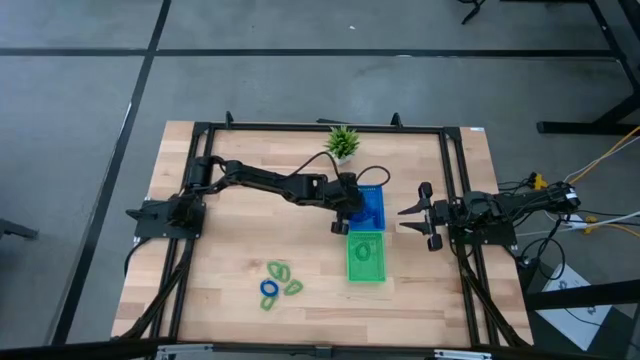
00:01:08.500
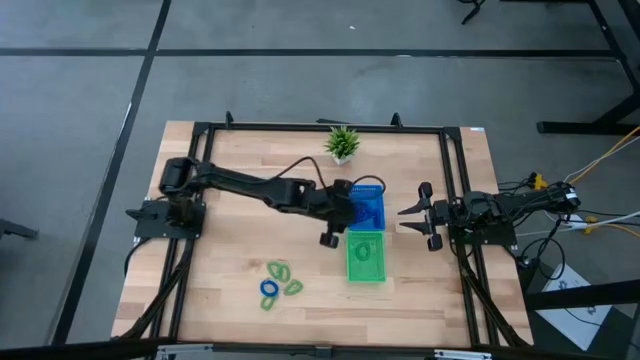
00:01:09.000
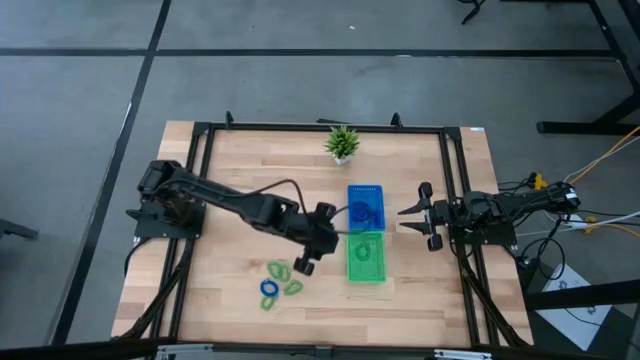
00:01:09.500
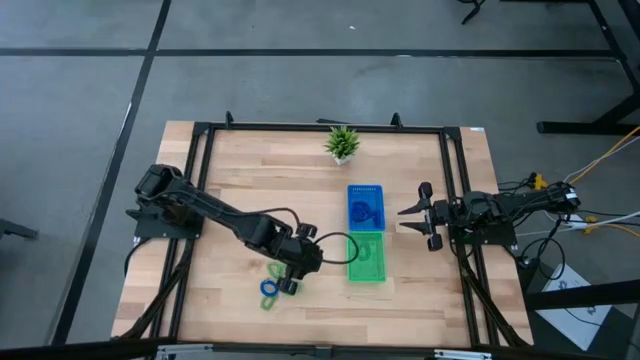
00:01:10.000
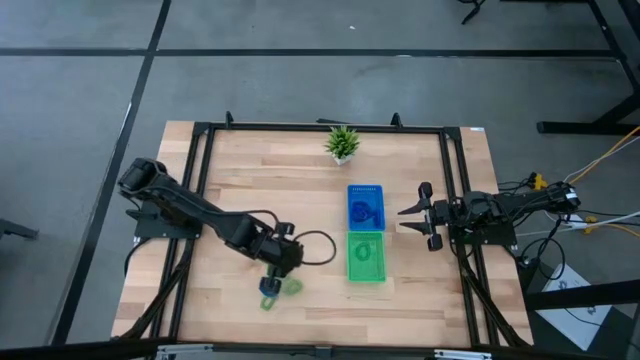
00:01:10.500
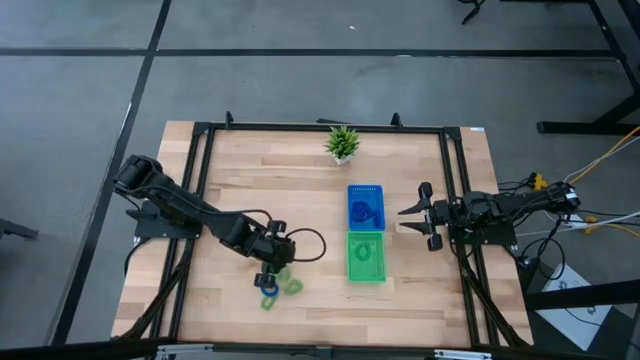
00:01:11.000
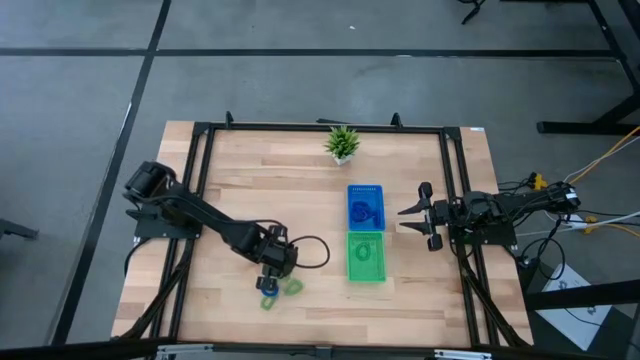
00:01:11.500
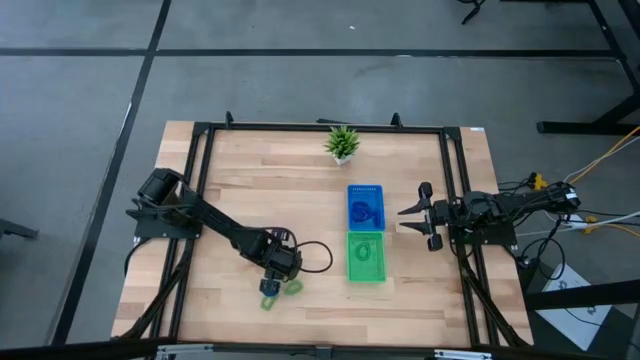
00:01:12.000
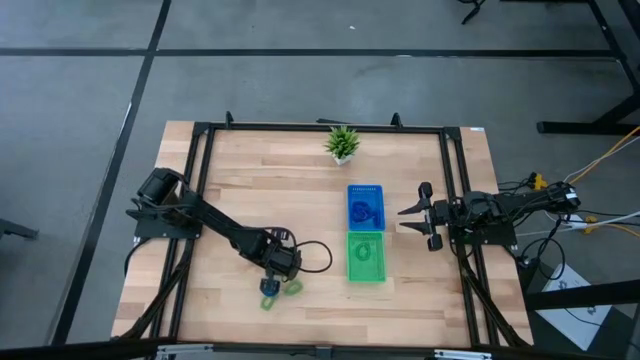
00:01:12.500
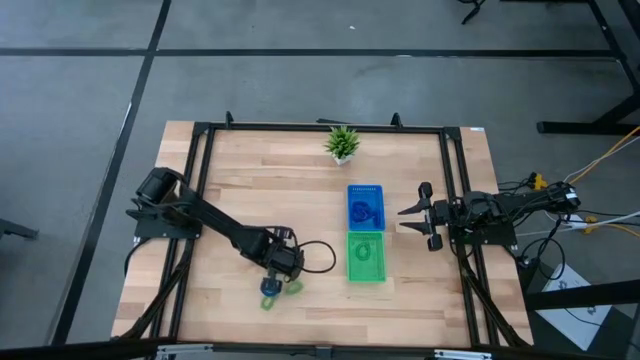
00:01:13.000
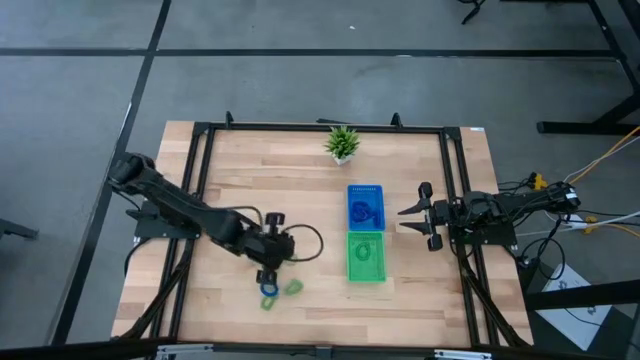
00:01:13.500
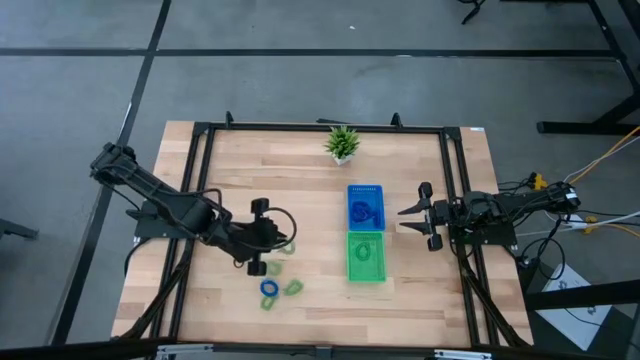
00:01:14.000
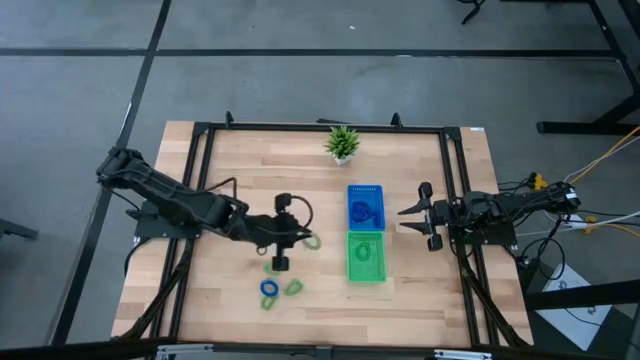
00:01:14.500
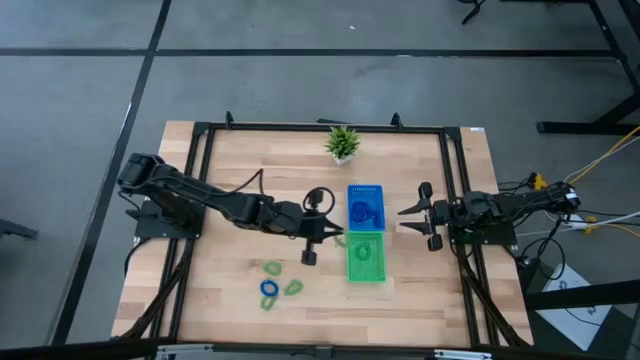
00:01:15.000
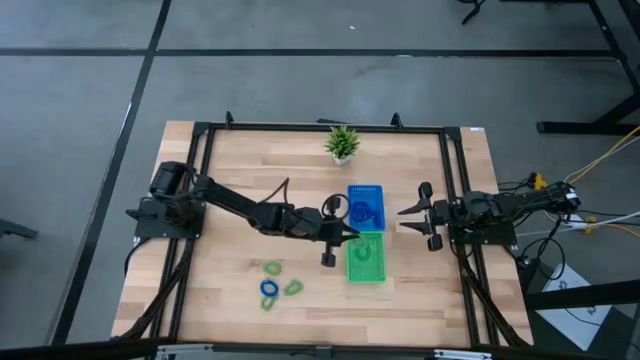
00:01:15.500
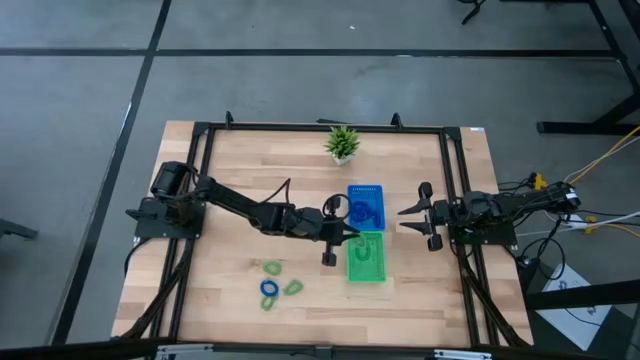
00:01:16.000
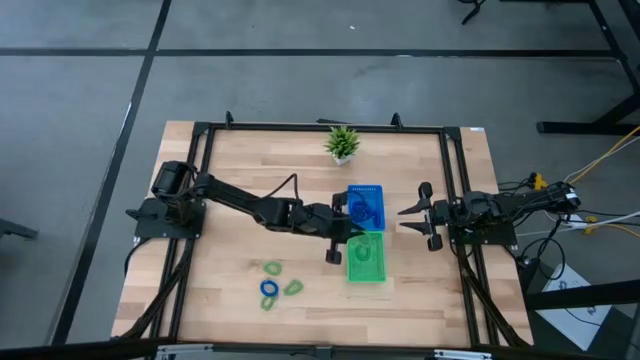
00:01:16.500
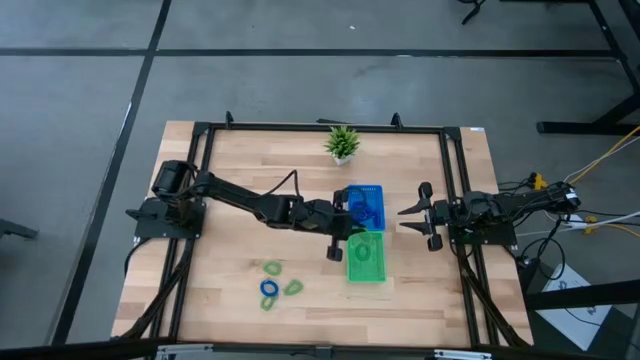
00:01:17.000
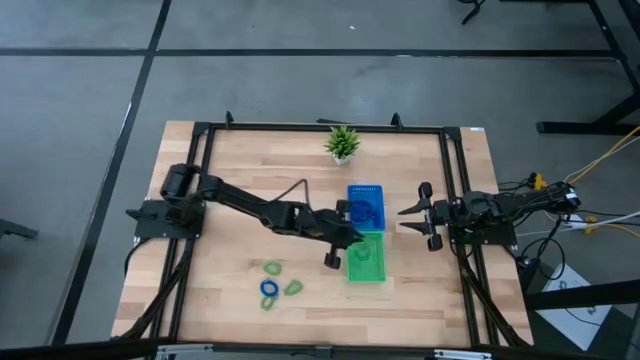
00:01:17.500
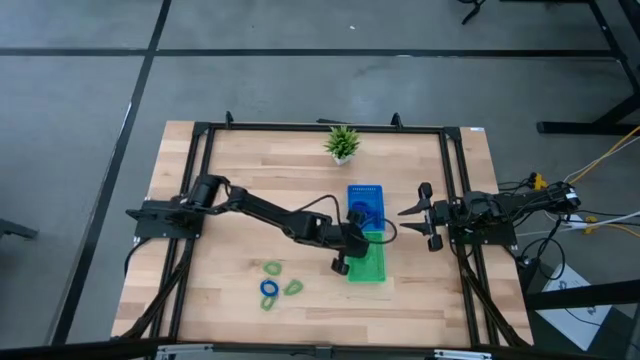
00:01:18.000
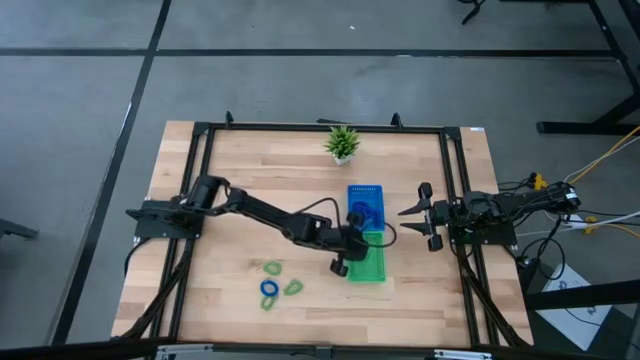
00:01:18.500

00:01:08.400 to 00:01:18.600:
Task: Sort spring keychains
Put the green spring keychain into the green bin

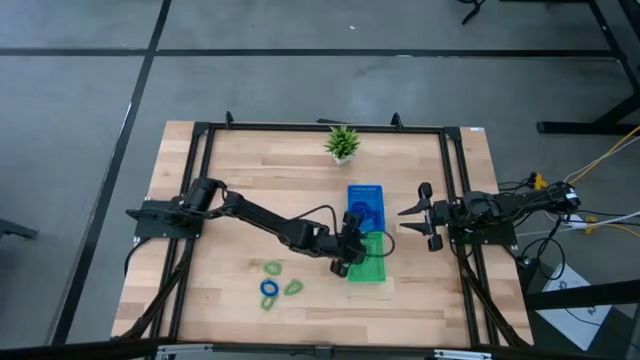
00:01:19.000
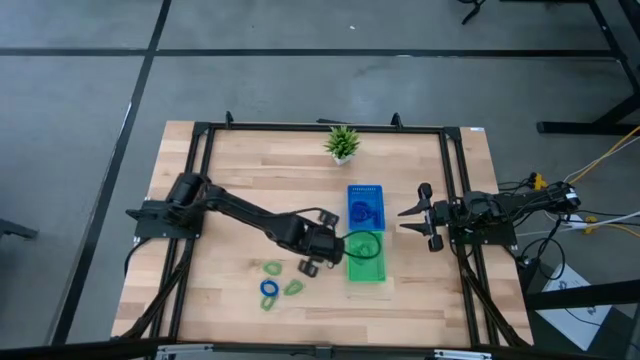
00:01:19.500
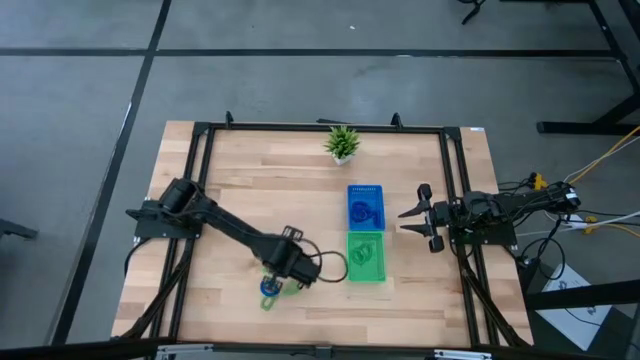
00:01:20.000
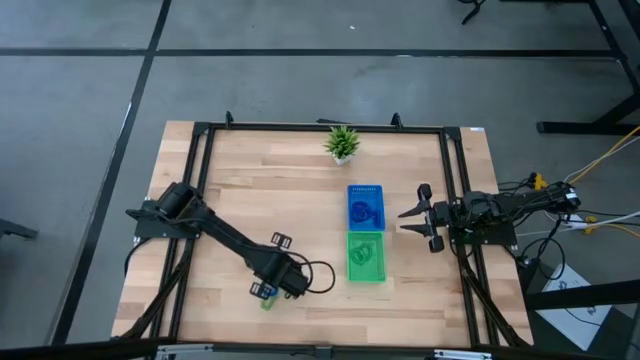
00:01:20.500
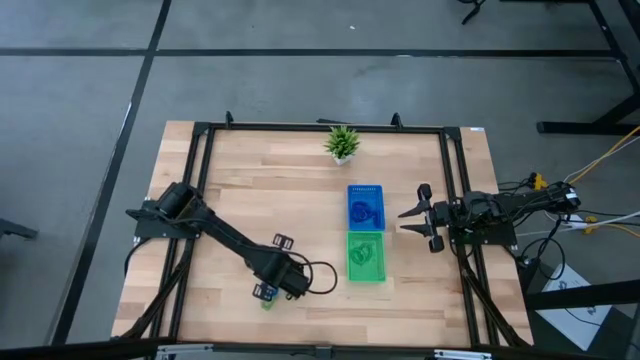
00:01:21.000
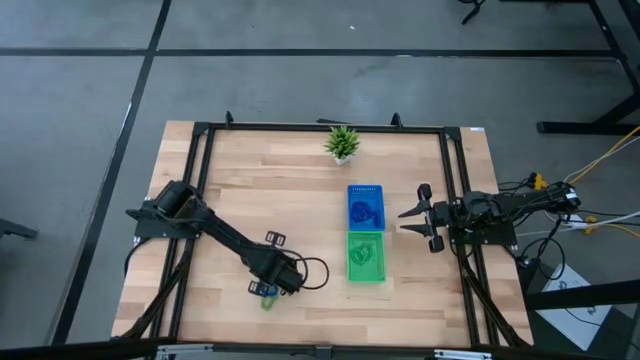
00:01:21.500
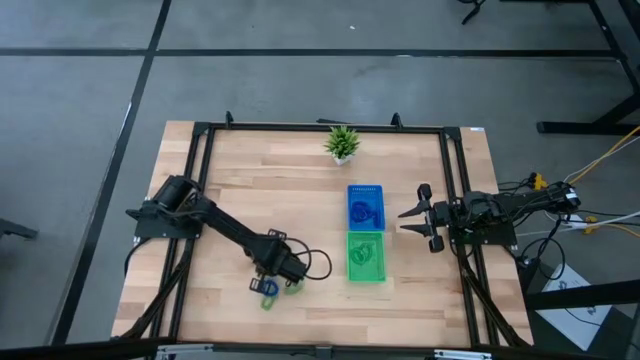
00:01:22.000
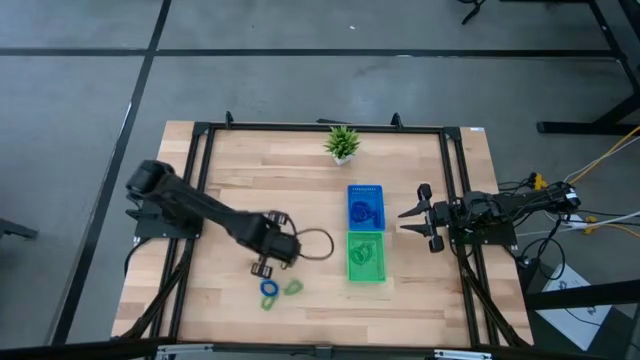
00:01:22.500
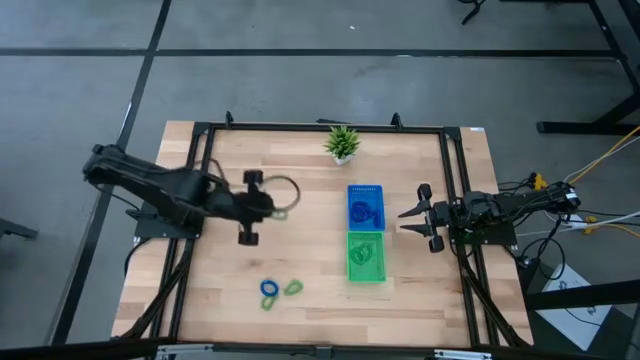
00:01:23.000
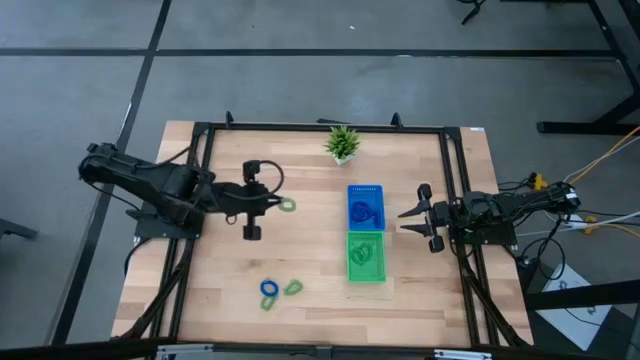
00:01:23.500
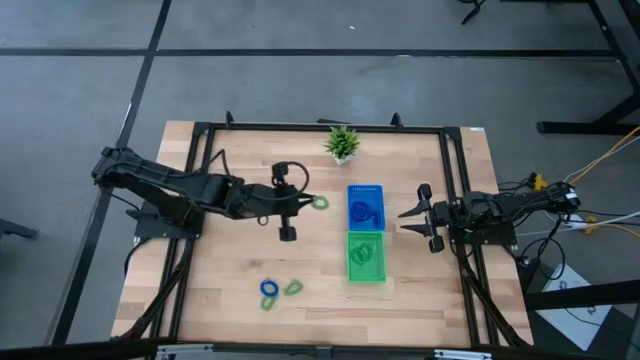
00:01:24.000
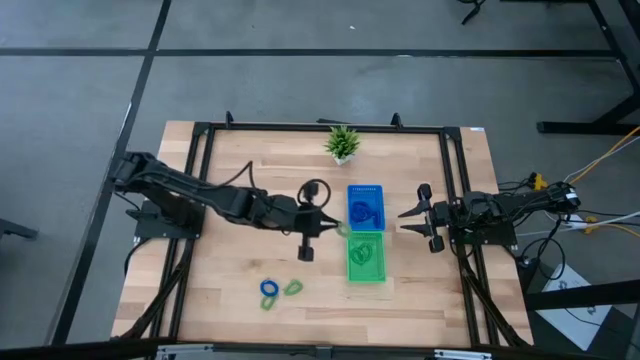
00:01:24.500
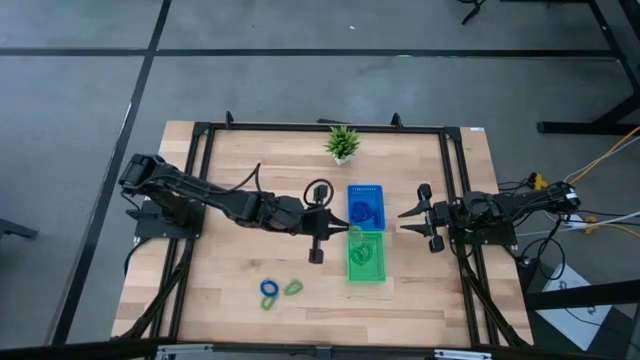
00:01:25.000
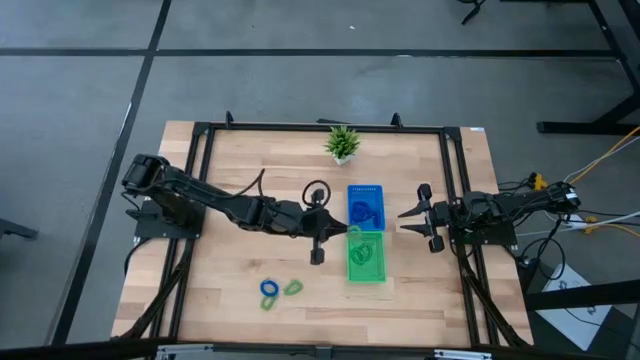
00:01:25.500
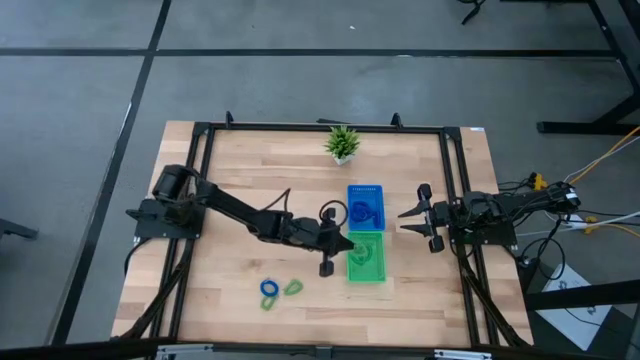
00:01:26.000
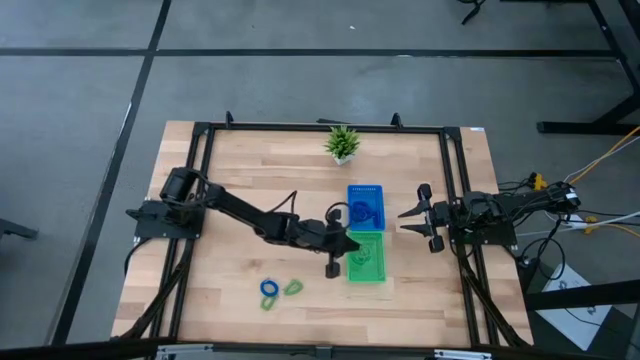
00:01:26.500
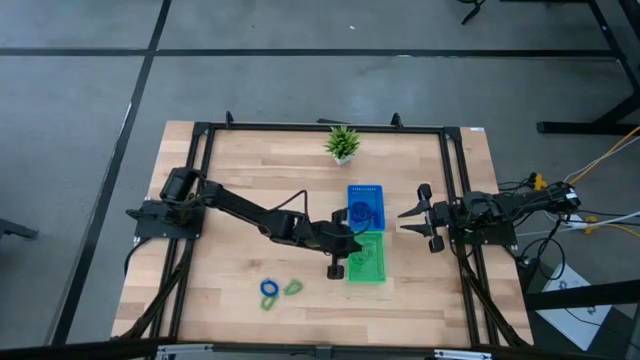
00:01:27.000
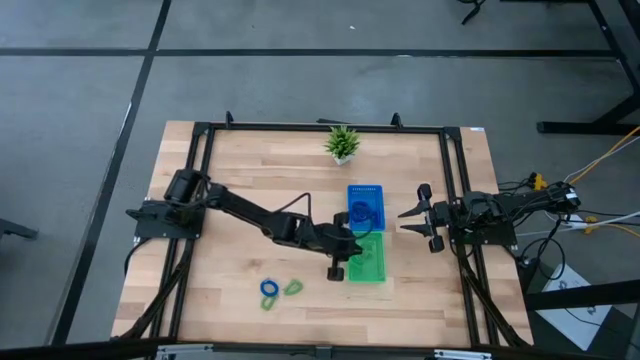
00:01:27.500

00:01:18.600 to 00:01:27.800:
Put the green spring keychain into the green bin

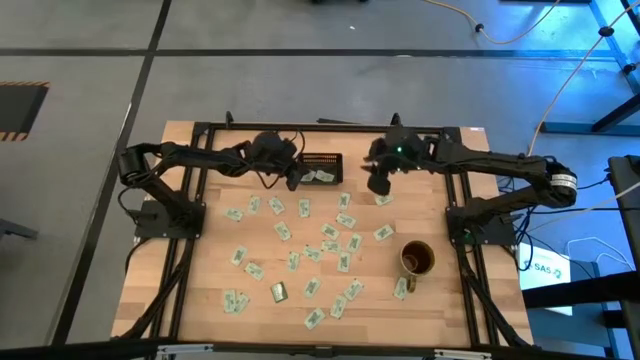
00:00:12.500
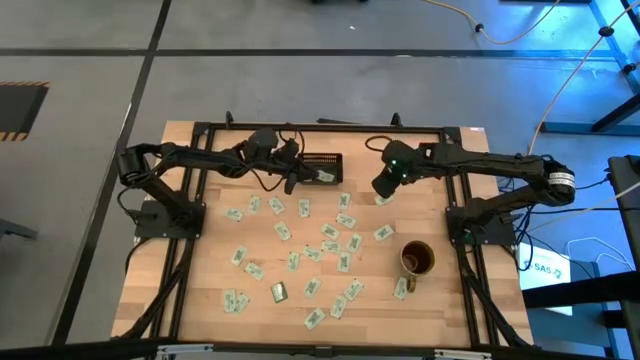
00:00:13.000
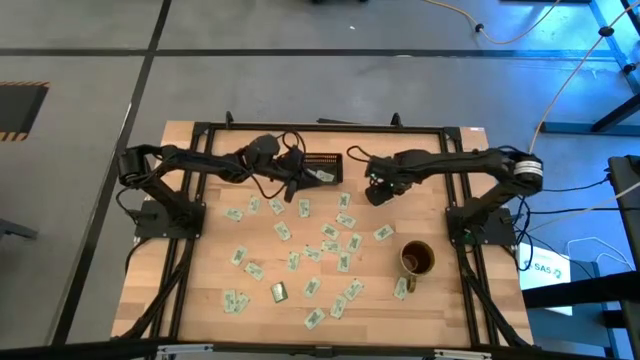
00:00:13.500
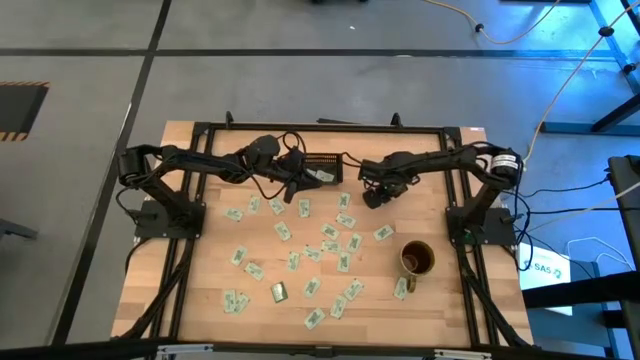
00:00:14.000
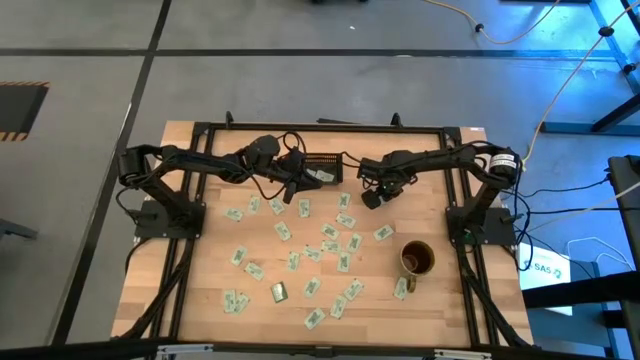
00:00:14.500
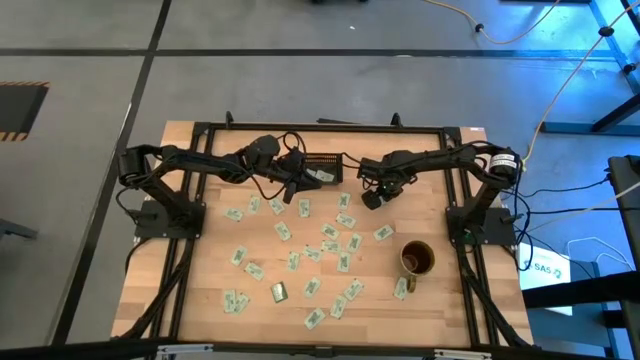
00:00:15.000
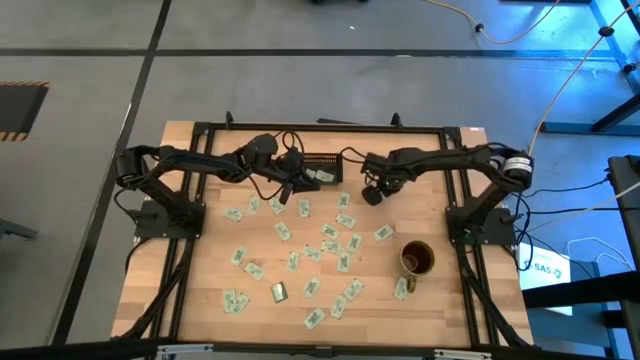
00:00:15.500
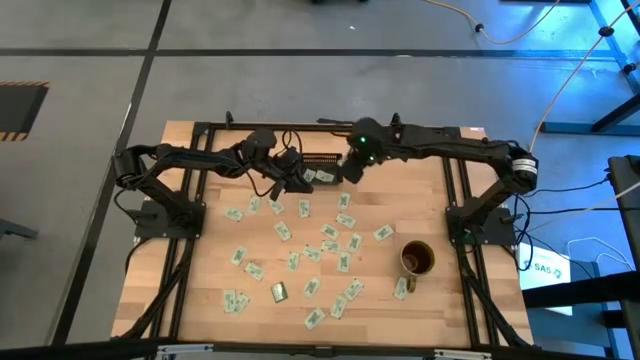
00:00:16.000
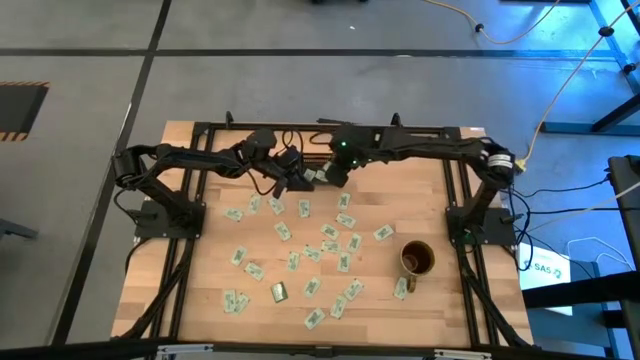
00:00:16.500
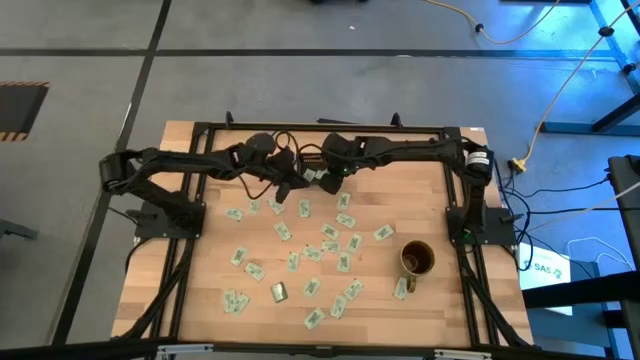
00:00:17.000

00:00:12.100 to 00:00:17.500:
Task: Pick and place Stevia / Truvia into bins
Put the white stevia packet into the black bin
